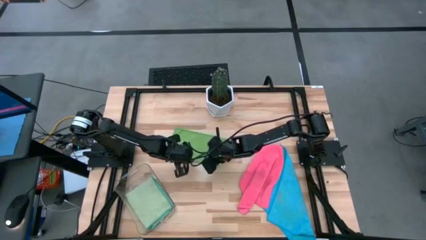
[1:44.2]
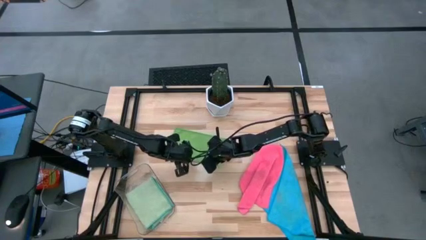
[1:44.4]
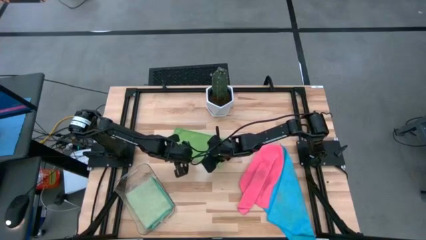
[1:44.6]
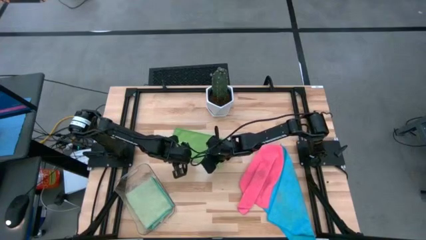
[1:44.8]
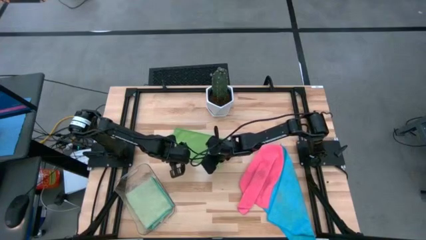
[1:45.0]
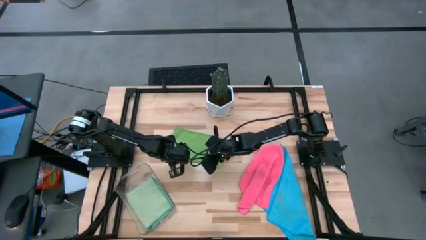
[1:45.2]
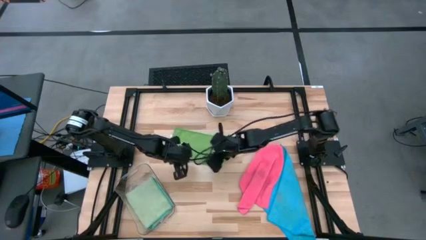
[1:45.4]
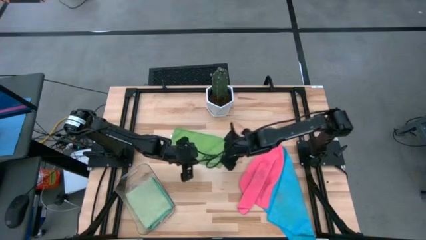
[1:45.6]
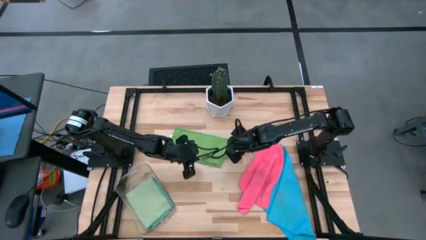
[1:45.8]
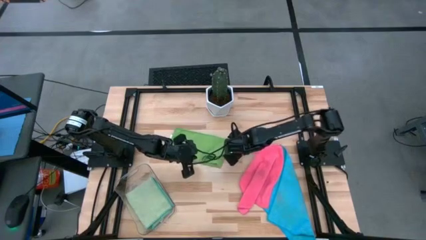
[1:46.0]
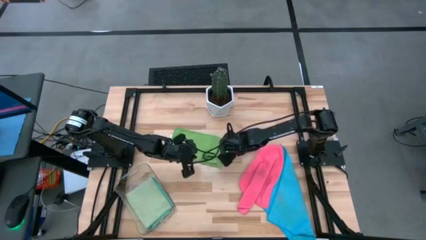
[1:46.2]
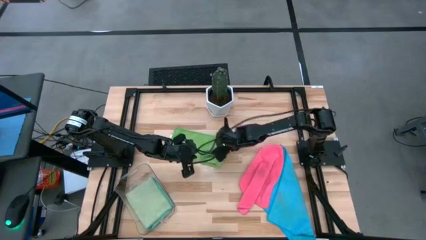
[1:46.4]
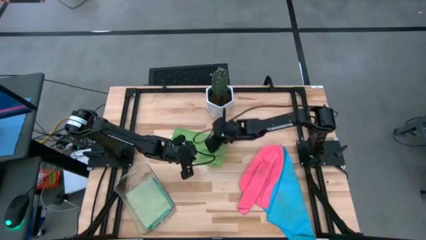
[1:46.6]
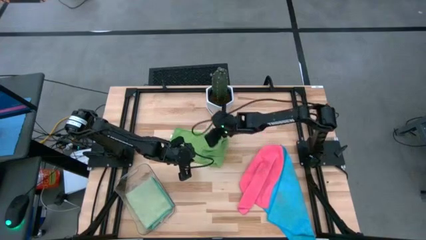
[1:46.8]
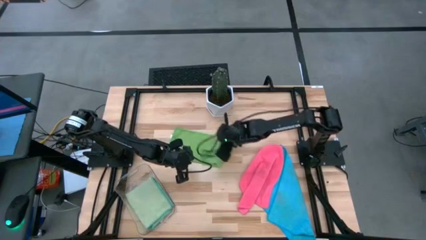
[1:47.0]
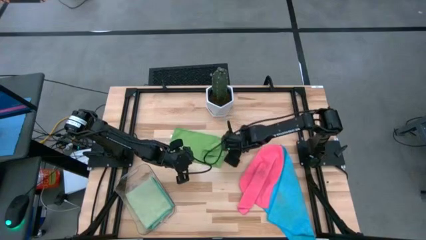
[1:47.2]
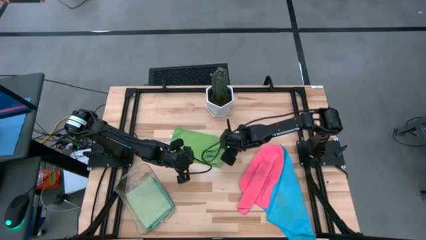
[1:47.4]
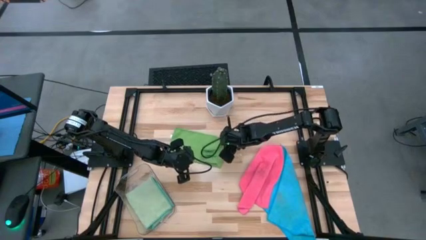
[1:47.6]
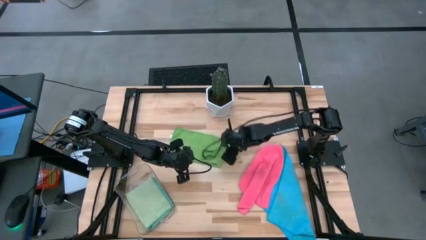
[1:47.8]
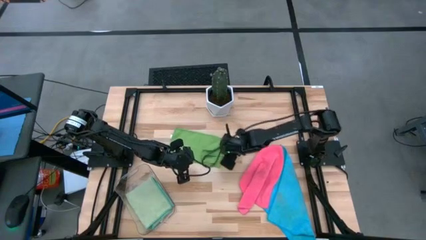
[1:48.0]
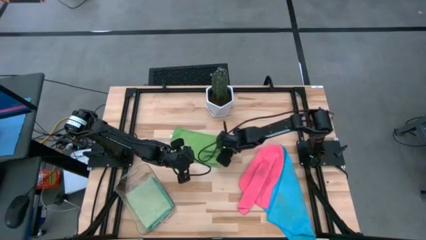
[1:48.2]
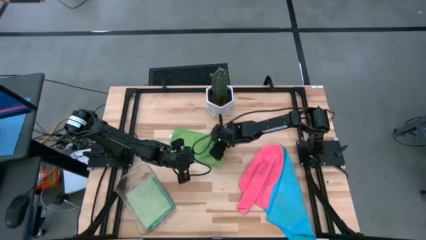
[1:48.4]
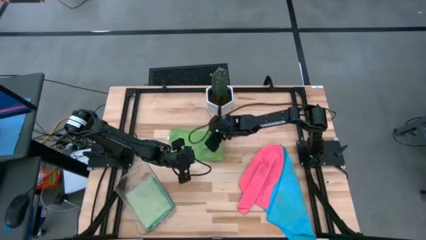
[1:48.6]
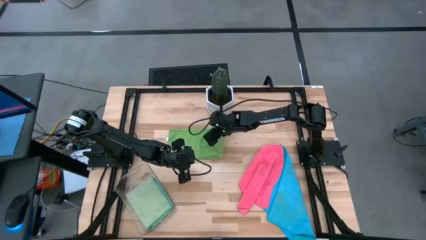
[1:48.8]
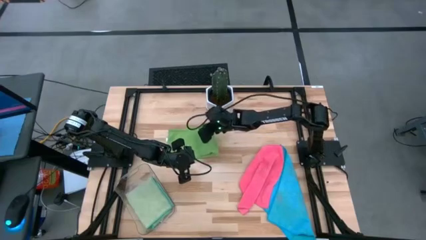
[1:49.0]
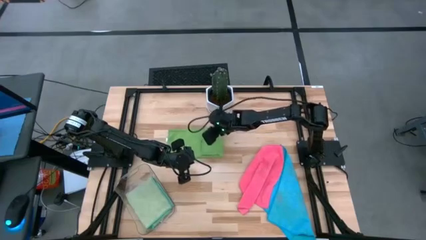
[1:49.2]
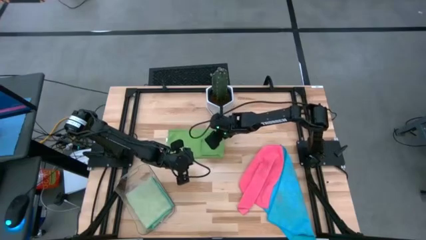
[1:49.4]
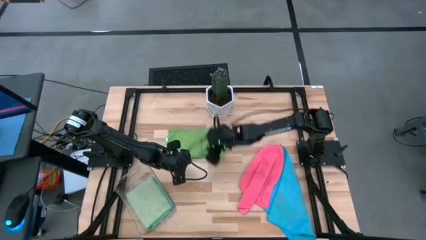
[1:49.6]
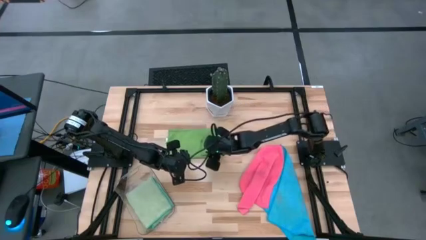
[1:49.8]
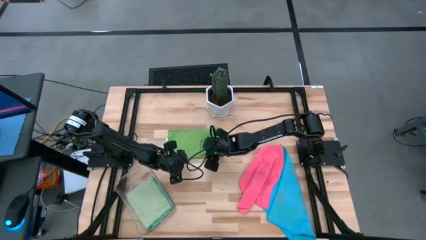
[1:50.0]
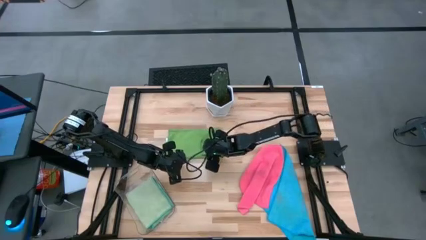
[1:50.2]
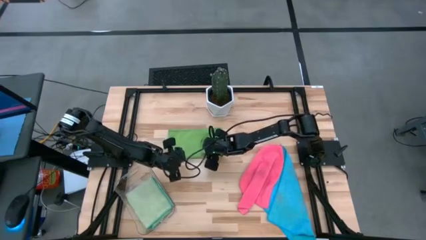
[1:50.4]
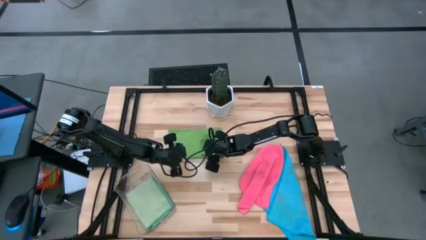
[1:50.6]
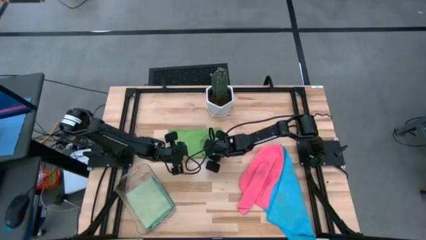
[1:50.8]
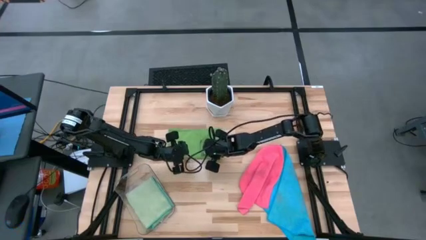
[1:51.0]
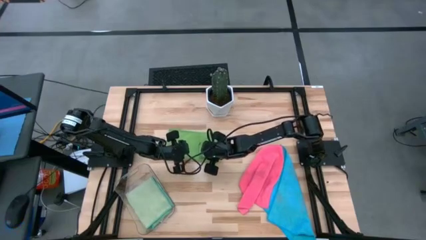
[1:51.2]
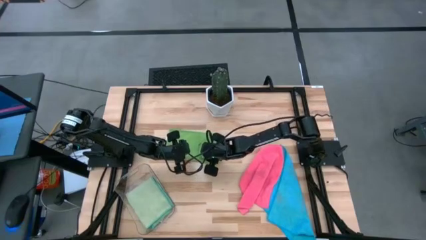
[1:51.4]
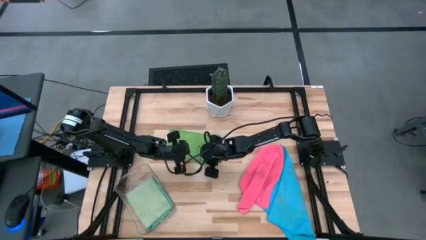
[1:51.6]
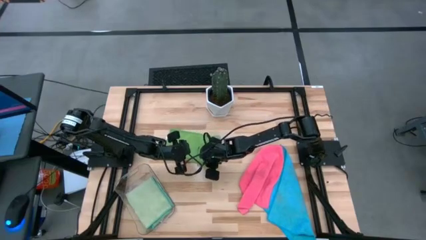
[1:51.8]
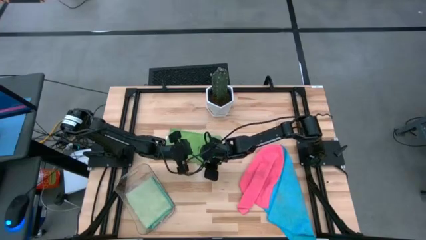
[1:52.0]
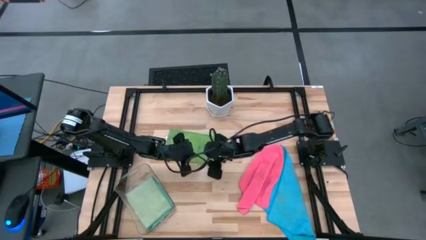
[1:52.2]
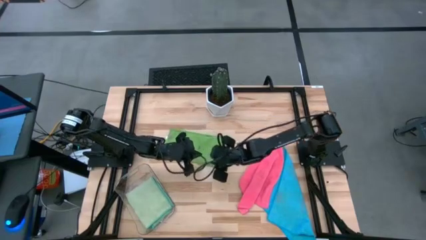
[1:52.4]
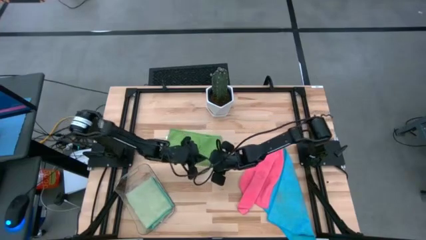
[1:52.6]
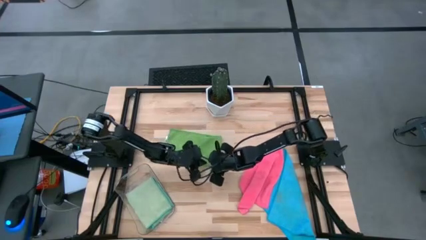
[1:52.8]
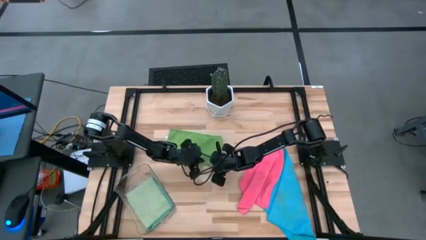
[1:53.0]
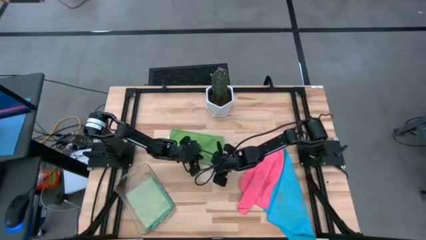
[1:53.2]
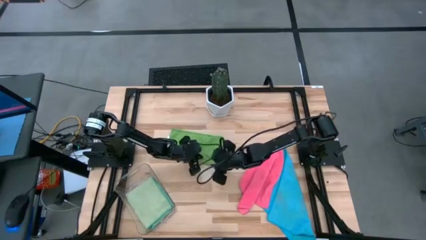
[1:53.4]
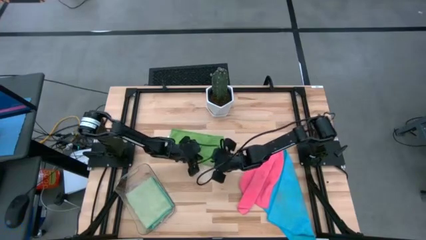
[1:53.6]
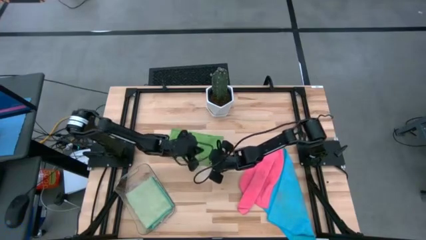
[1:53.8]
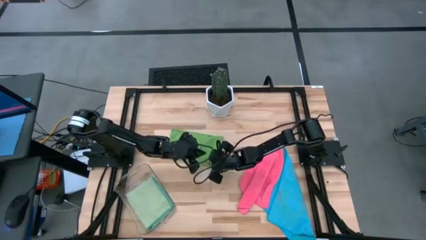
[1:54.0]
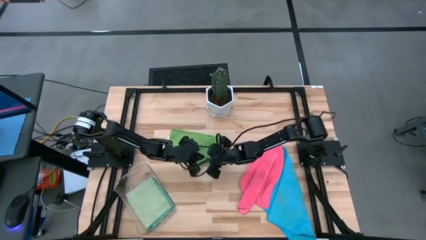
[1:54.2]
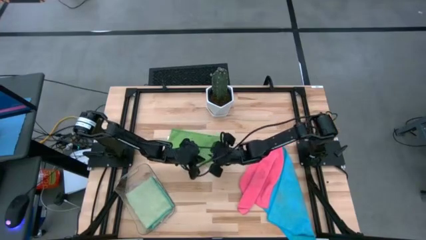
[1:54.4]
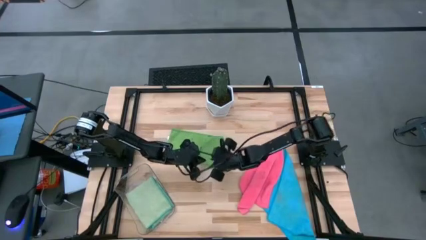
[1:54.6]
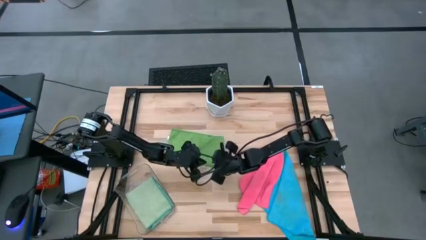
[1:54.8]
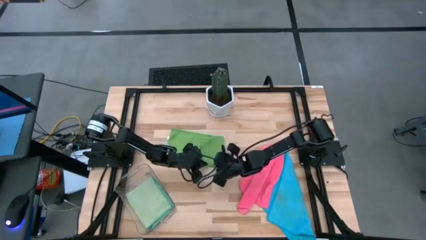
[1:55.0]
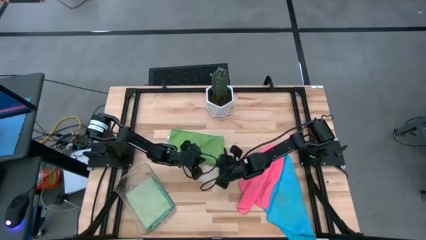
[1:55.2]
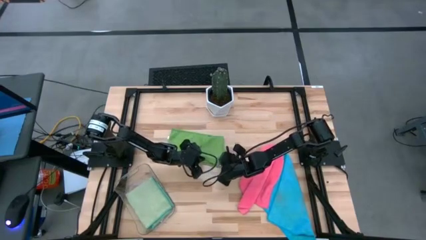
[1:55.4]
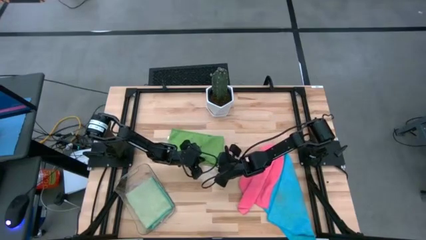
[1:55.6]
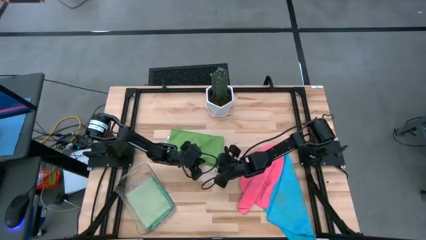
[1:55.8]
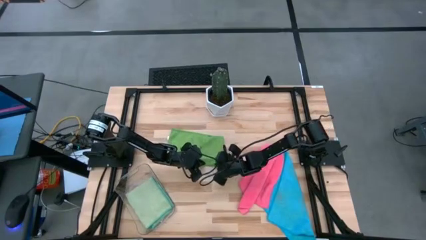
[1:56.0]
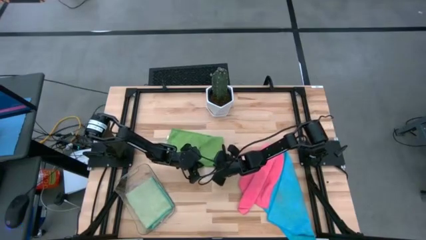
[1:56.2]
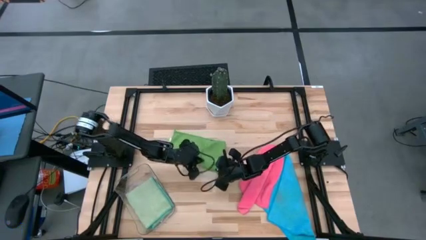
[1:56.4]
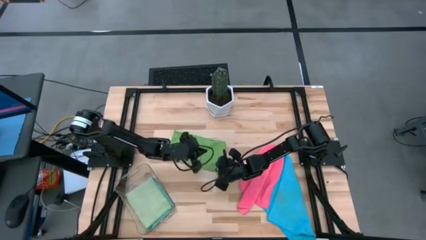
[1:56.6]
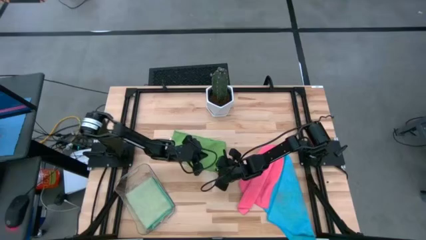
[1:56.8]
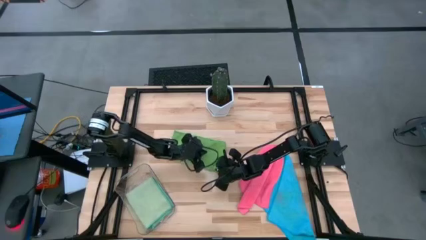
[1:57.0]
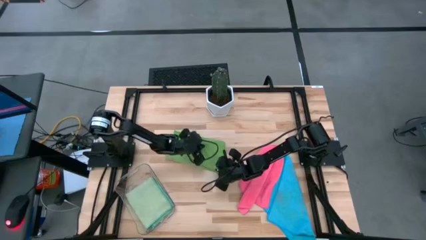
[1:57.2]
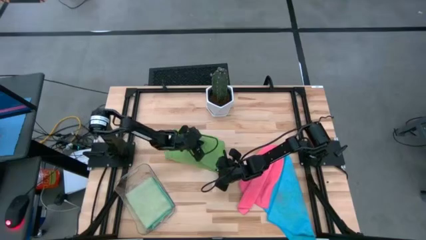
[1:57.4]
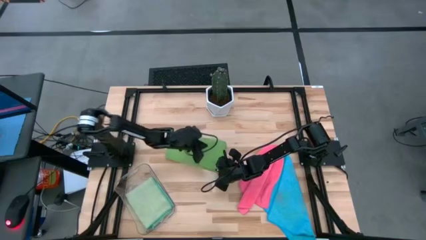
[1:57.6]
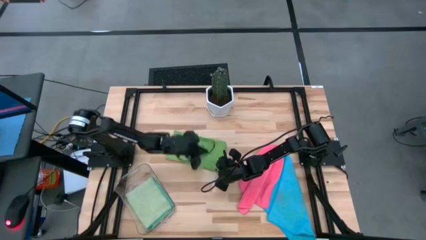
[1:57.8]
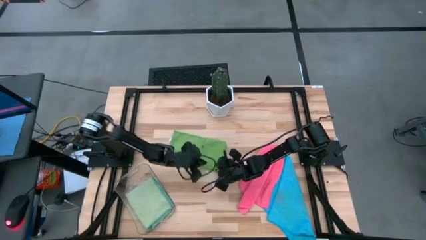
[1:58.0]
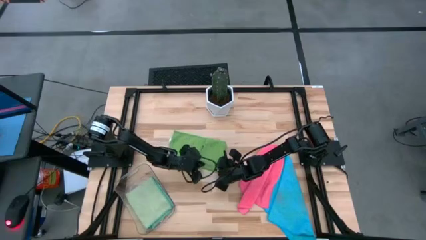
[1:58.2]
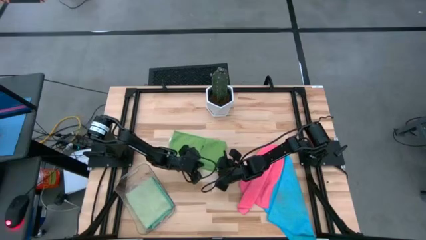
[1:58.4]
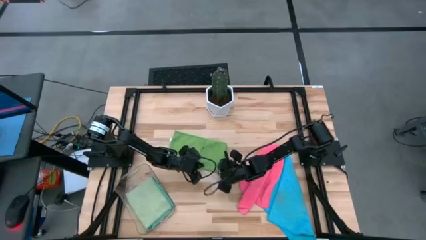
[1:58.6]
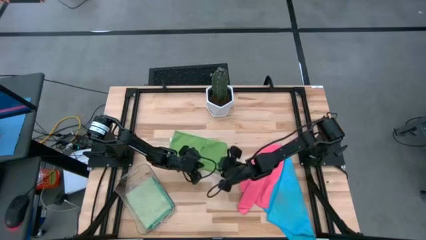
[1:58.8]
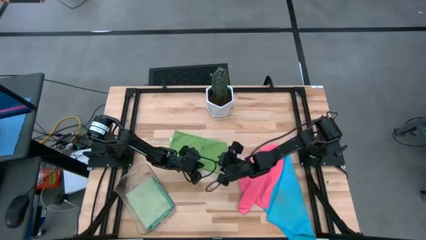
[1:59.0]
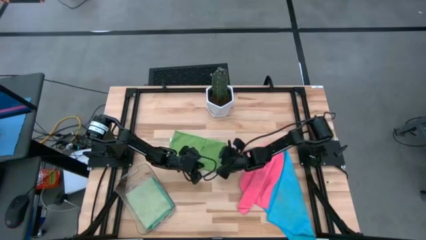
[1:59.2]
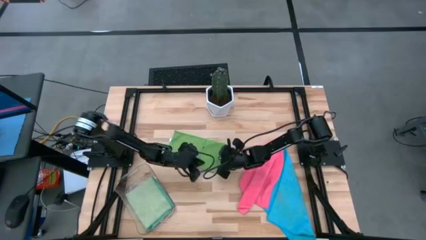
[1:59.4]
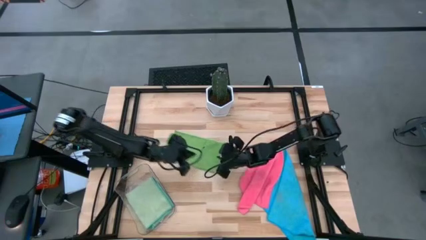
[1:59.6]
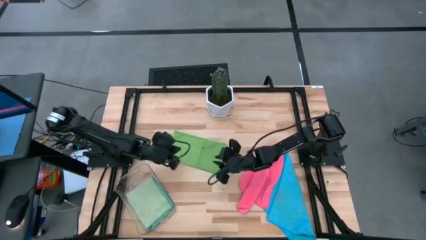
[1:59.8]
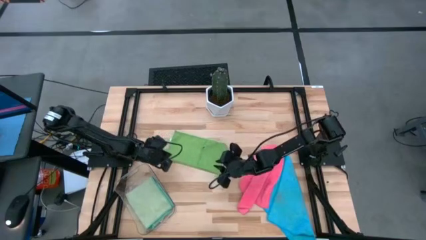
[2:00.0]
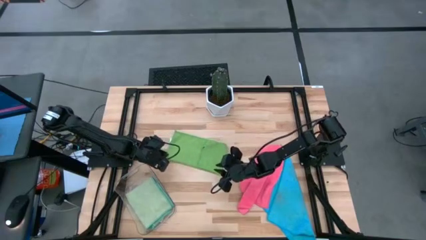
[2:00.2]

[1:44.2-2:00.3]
Task: Fold microfiber towels
Fold the green microfiber cloth
